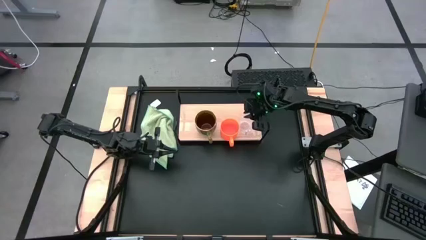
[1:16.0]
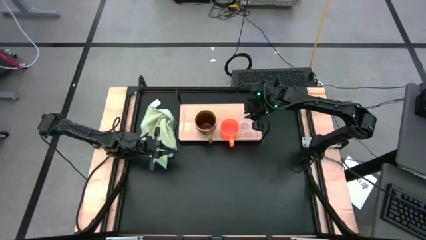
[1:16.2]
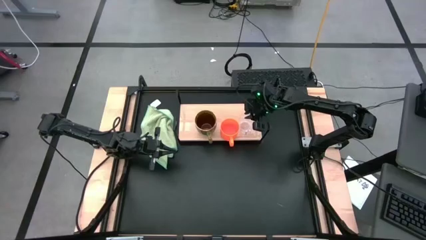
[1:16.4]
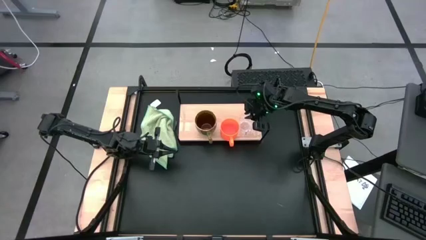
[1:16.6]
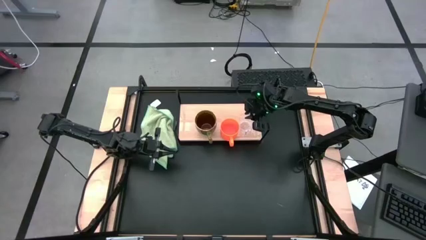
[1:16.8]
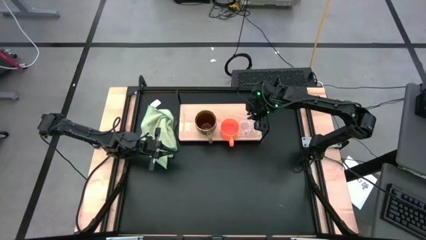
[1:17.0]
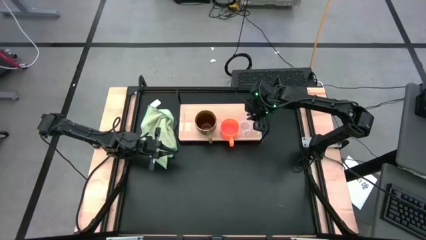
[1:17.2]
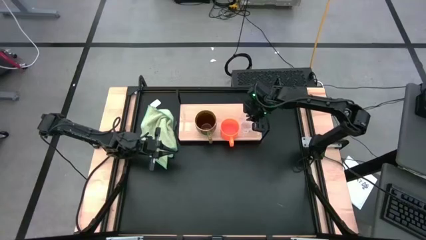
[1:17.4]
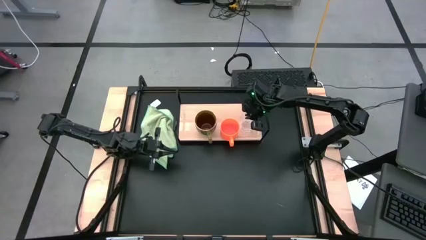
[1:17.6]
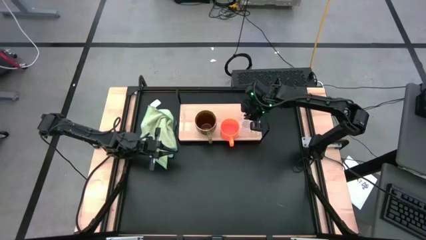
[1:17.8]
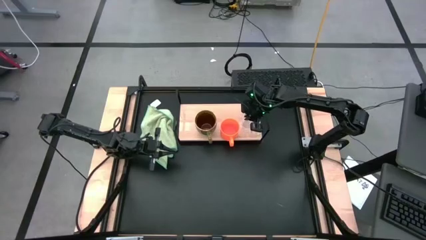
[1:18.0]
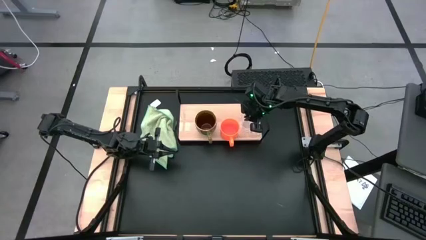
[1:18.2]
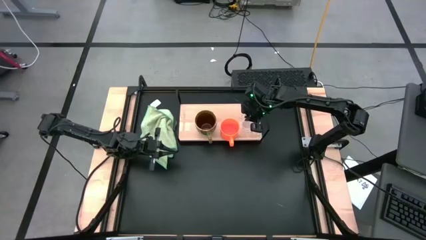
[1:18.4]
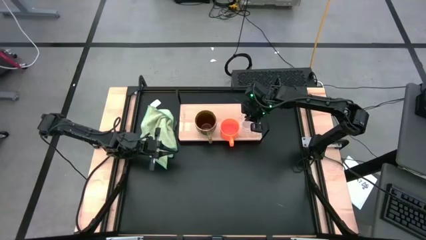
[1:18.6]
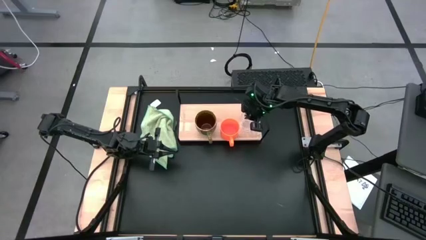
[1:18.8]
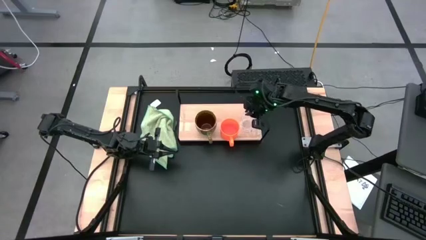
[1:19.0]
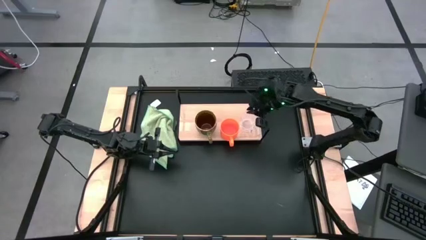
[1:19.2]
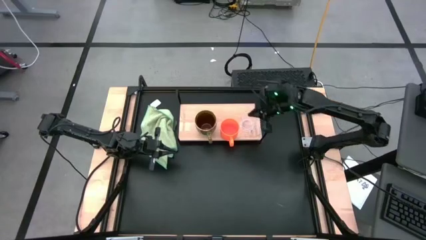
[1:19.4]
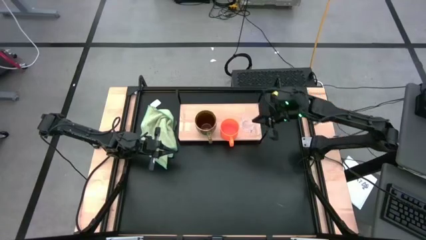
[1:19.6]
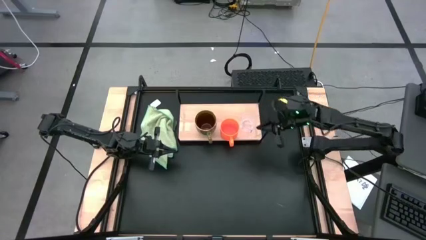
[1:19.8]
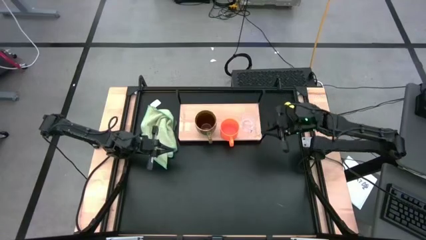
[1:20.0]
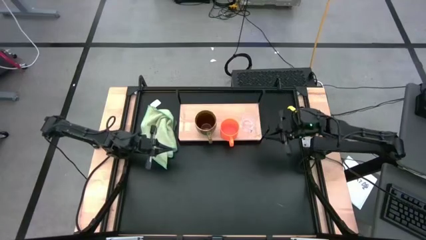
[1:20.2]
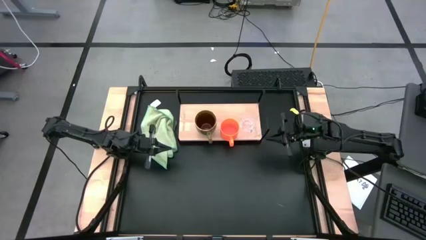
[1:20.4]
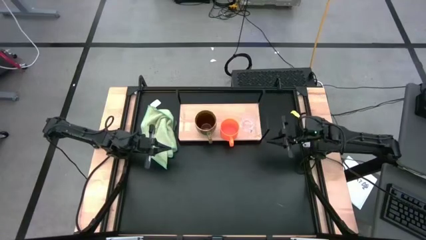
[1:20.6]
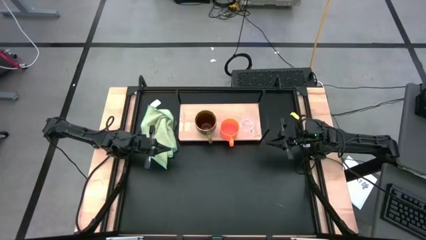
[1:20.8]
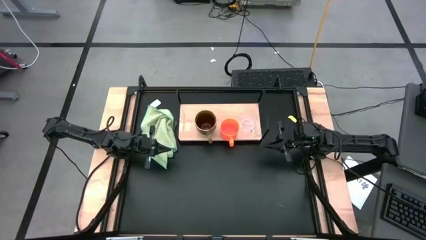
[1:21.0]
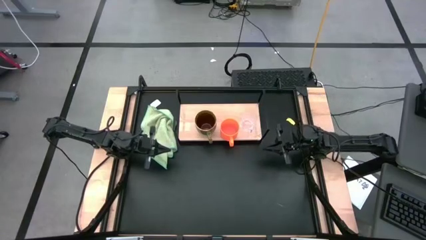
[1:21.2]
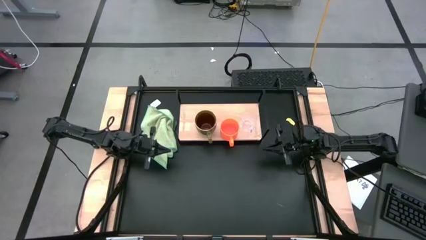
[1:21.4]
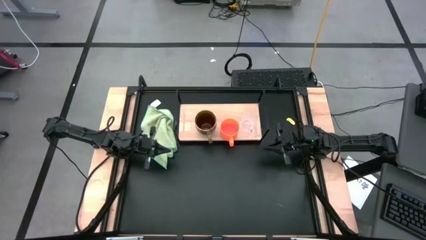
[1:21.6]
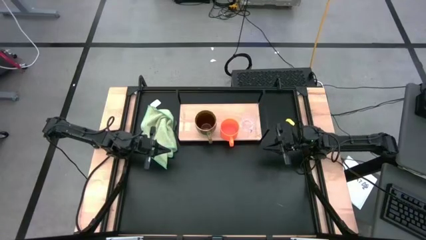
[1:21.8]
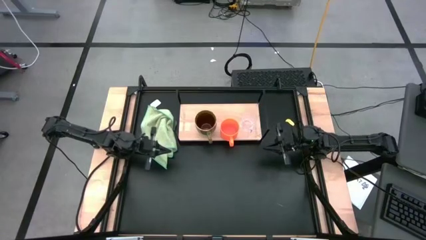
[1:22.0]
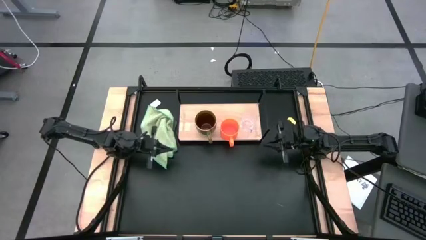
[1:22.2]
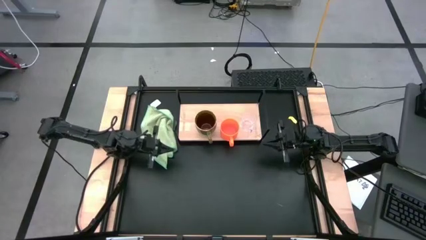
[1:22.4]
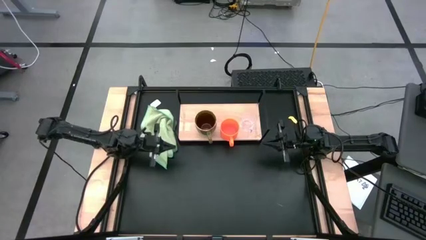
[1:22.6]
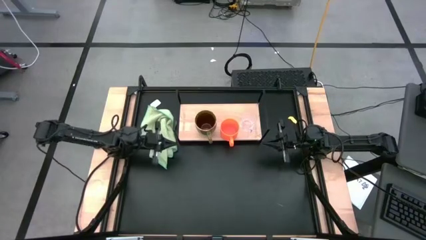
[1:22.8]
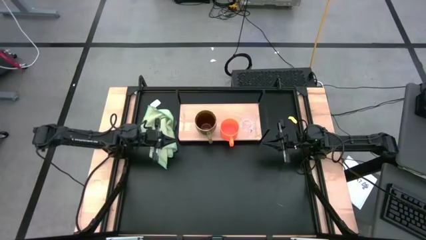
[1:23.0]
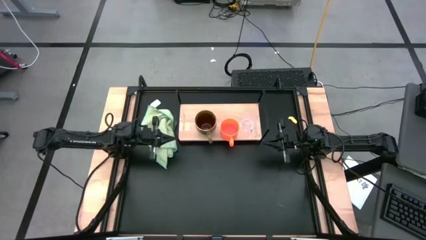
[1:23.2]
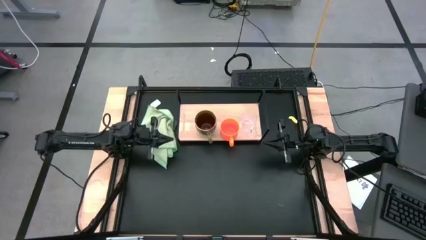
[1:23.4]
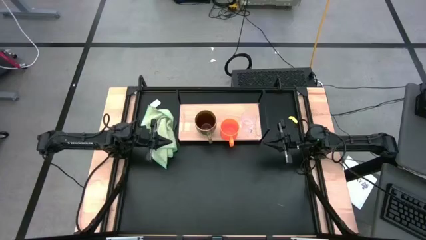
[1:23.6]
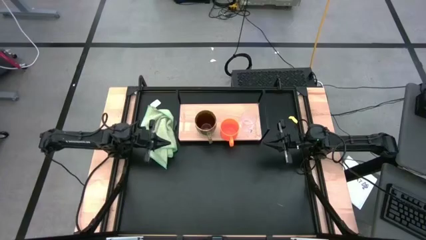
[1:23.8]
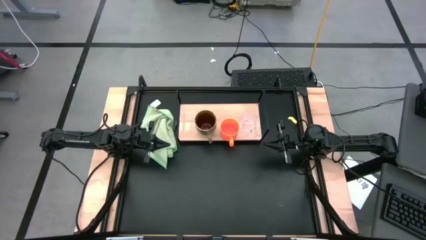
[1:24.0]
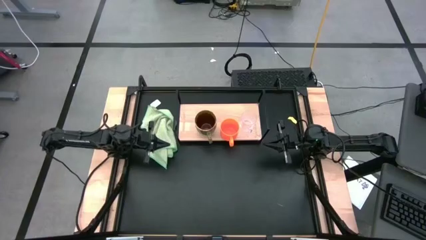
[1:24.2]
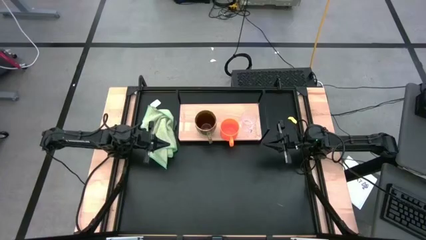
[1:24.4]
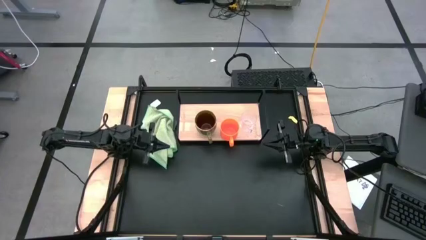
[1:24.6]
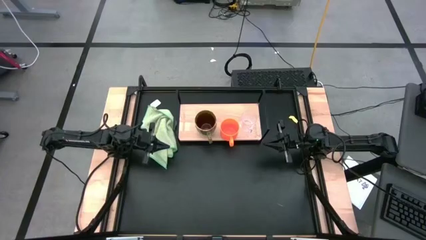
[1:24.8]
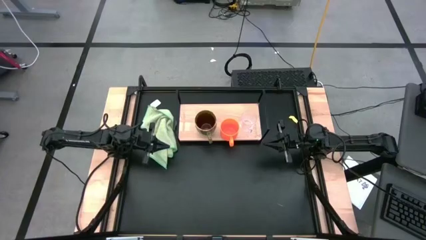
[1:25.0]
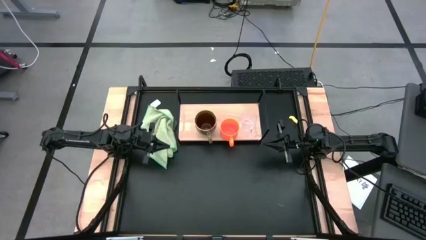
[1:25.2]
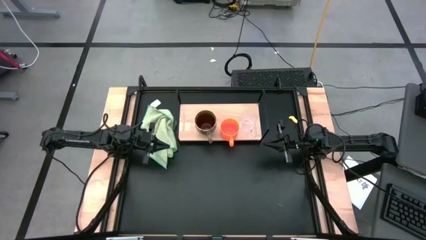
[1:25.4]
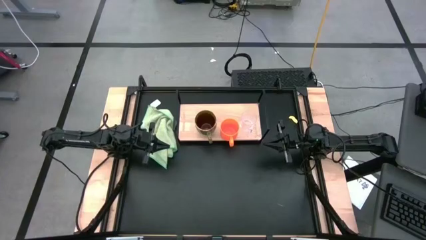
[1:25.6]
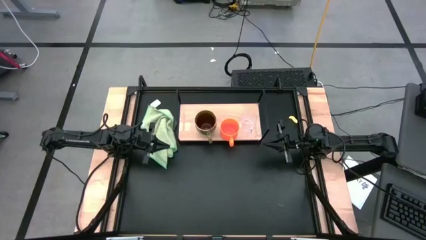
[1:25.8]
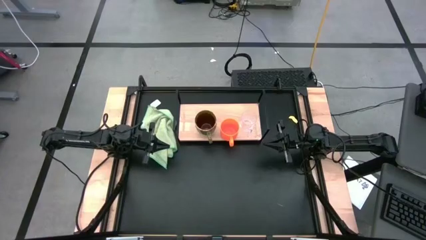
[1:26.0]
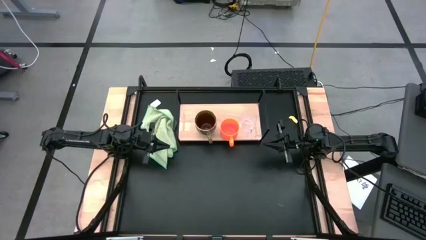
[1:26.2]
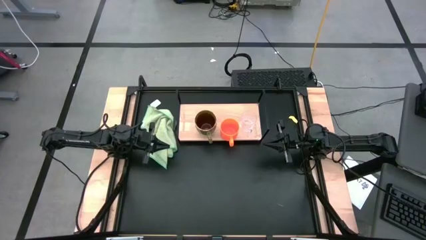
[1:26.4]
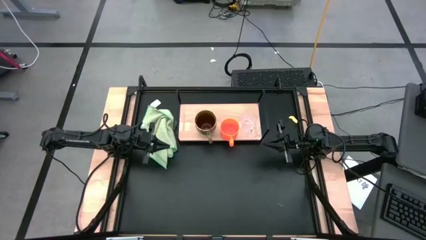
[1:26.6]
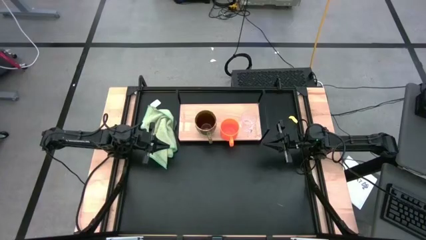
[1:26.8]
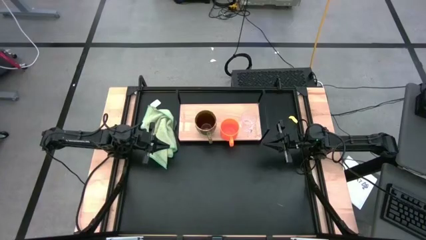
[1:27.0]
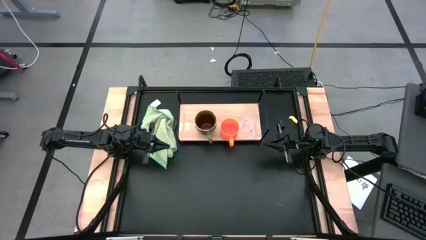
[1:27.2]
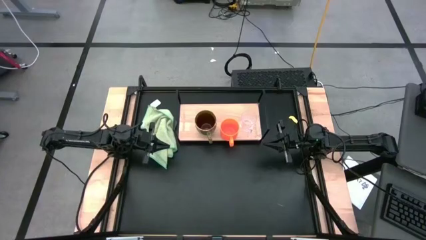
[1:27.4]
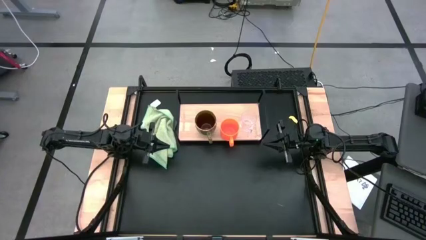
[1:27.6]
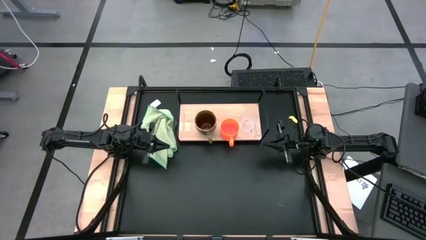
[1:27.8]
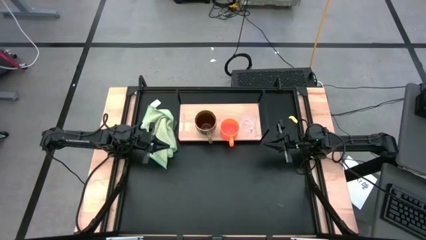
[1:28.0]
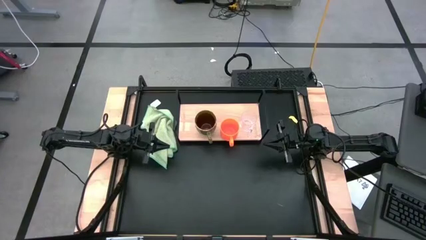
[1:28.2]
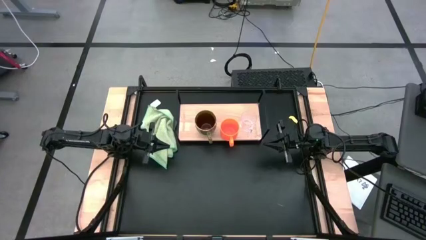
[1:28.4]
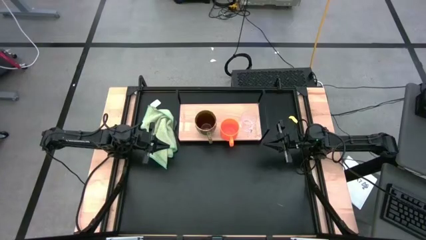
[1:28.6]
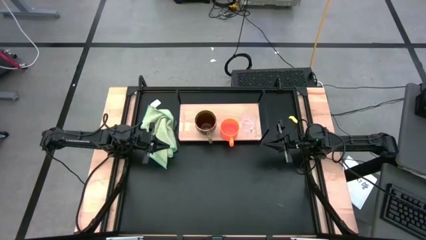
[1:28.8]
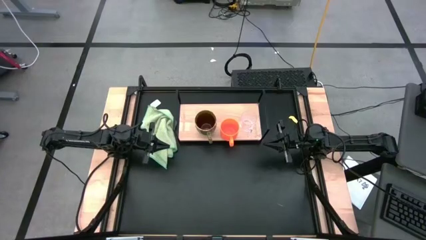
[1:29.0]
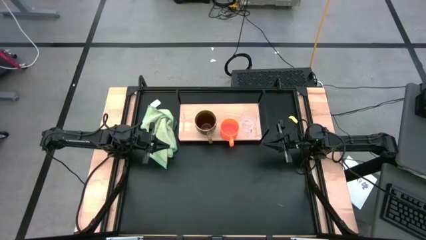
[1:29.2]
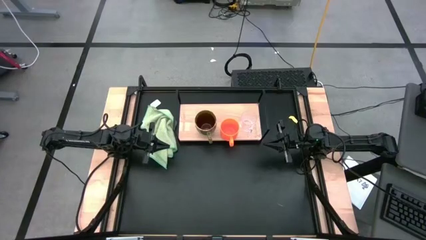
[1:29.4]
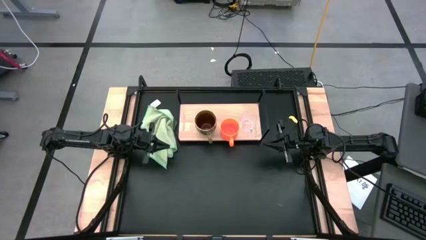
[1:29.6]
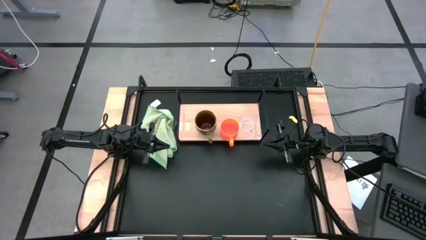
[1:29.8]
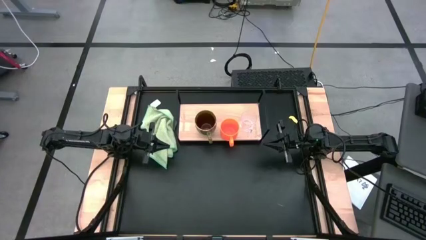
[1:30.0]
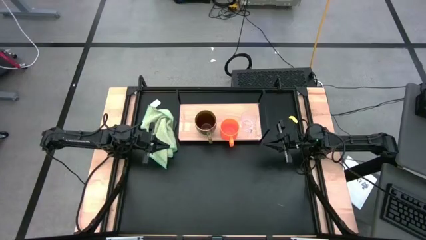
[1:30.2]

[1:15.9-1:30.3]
Task: Stack small to large cups/mugs on shelf
Return to Home Position
